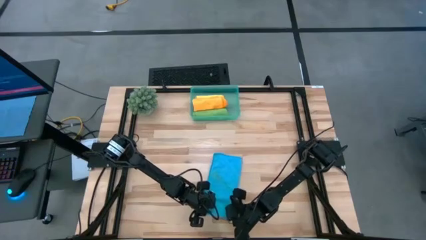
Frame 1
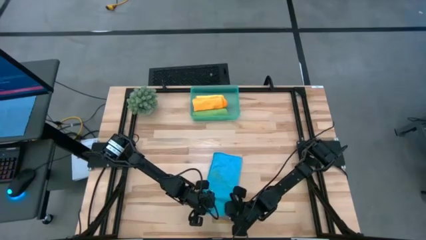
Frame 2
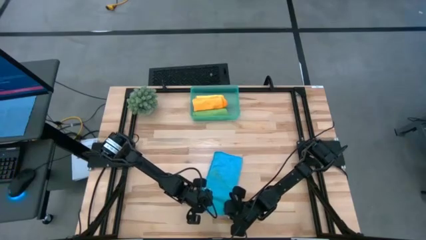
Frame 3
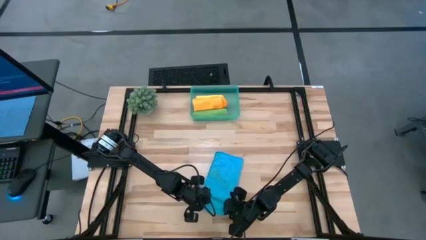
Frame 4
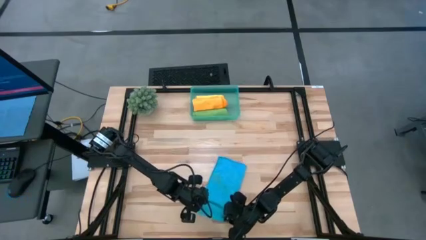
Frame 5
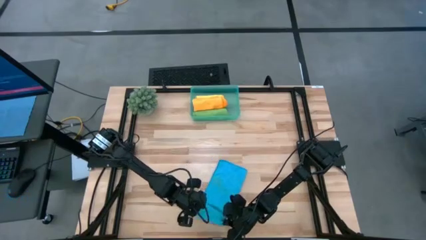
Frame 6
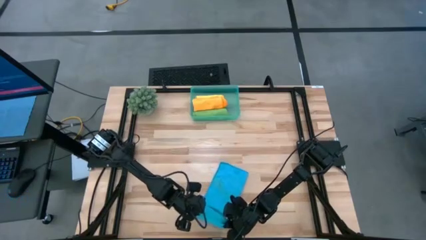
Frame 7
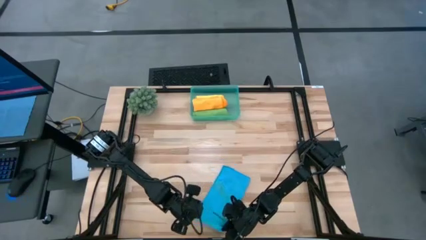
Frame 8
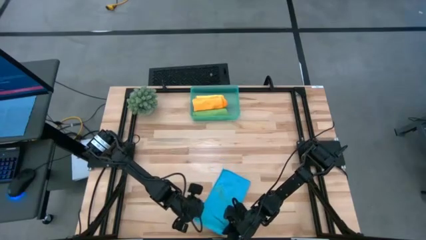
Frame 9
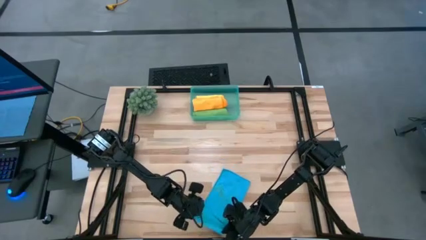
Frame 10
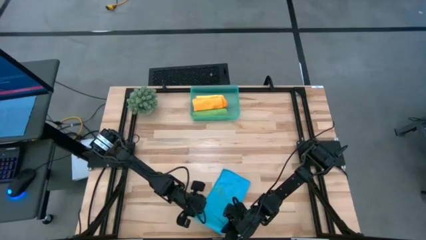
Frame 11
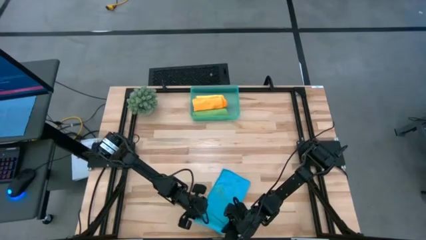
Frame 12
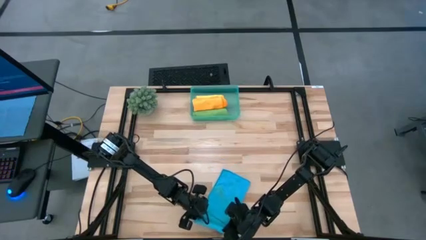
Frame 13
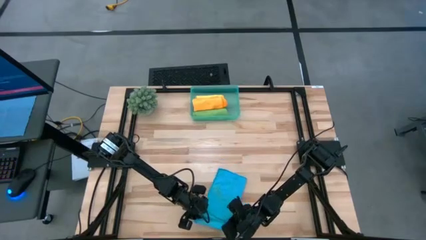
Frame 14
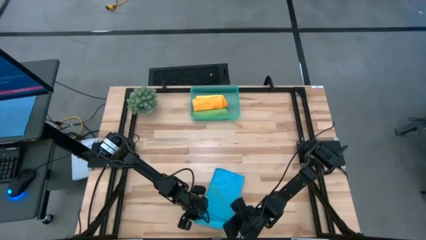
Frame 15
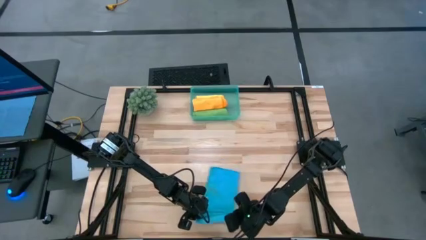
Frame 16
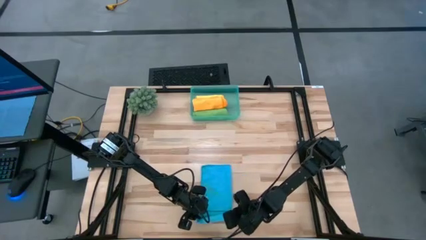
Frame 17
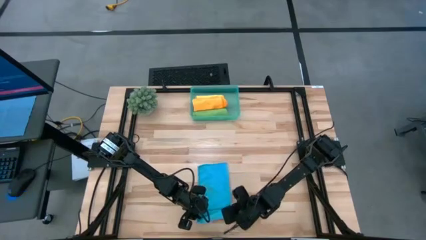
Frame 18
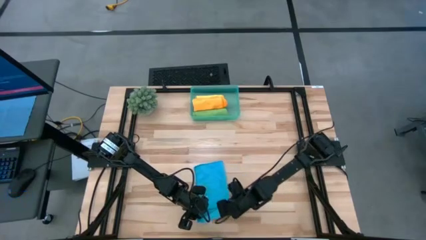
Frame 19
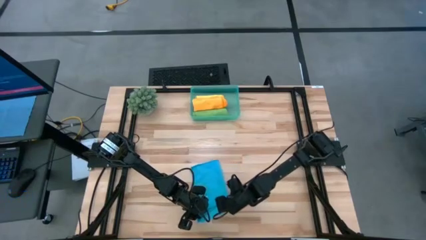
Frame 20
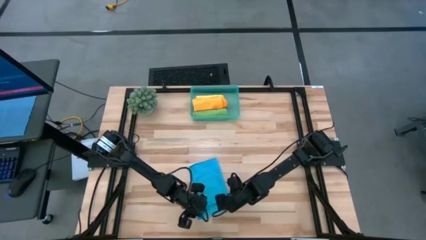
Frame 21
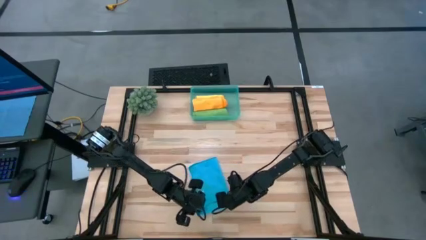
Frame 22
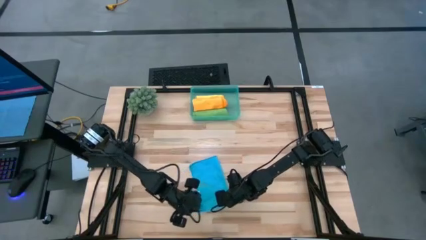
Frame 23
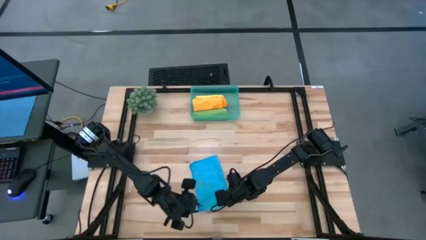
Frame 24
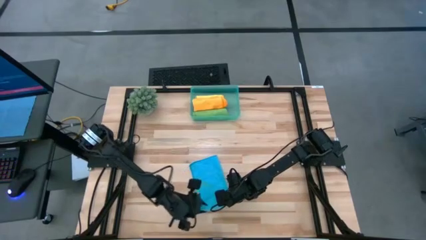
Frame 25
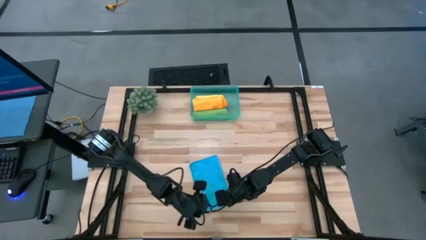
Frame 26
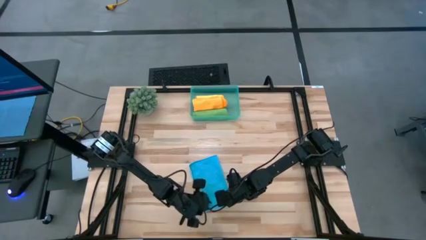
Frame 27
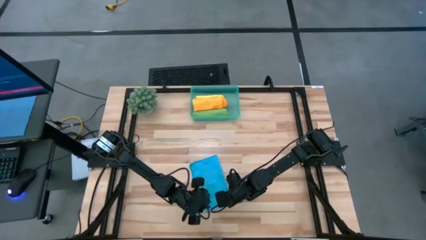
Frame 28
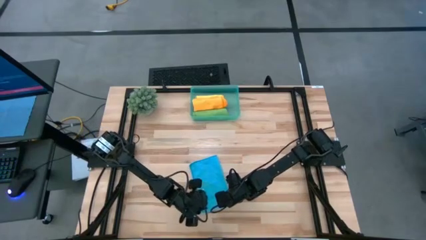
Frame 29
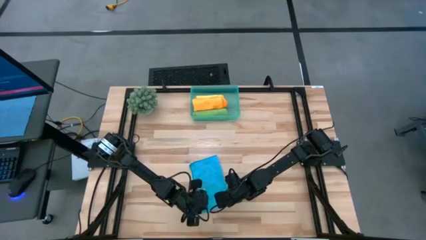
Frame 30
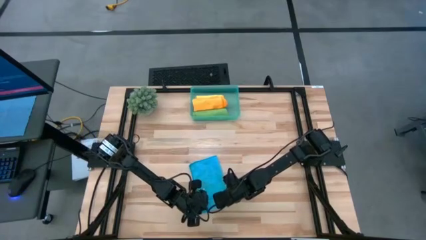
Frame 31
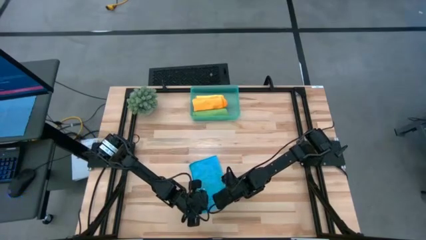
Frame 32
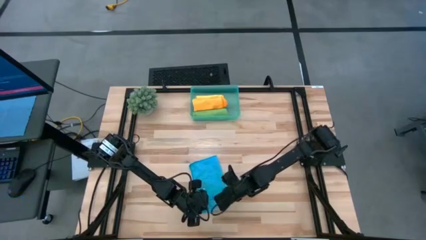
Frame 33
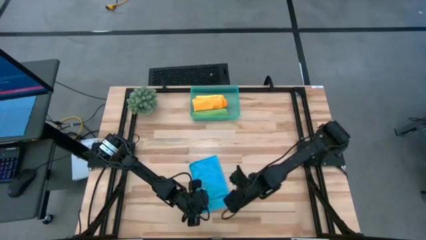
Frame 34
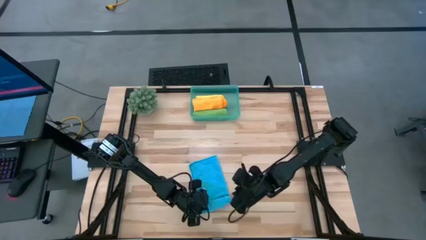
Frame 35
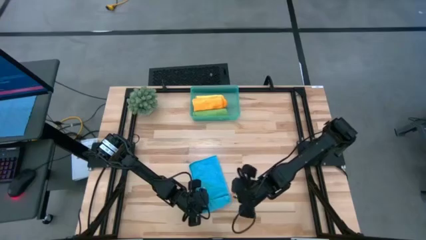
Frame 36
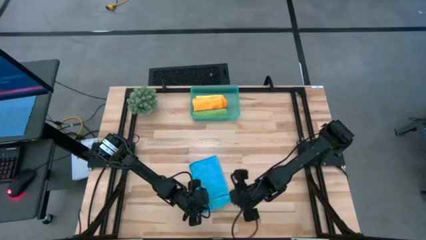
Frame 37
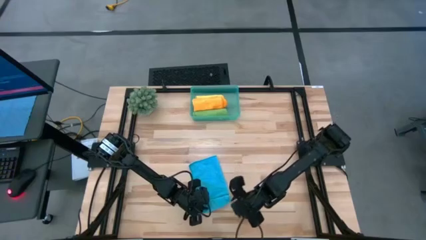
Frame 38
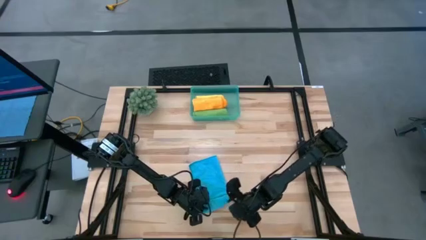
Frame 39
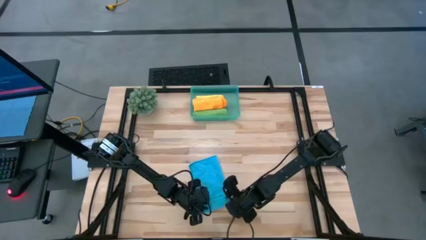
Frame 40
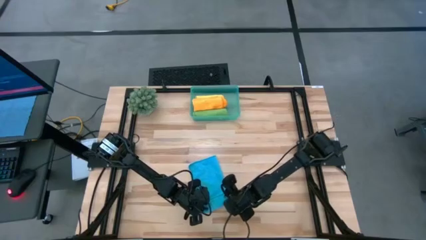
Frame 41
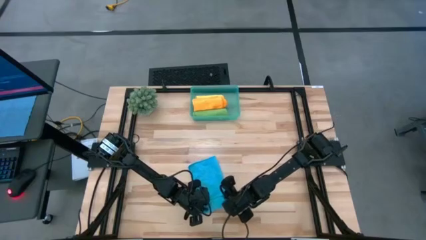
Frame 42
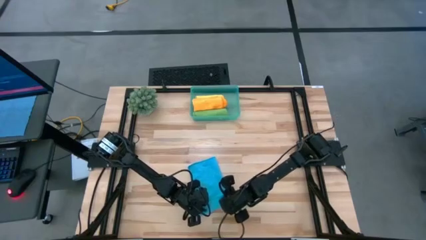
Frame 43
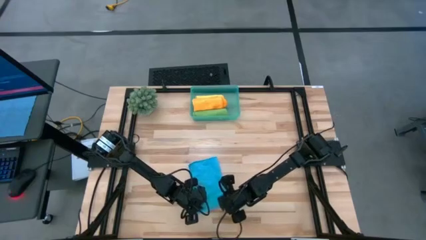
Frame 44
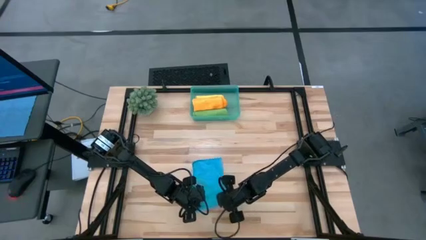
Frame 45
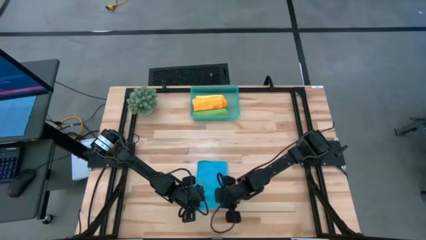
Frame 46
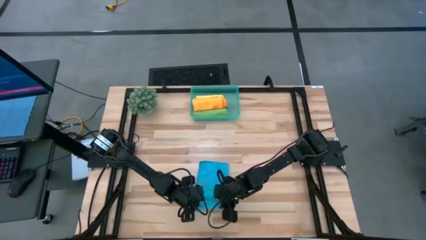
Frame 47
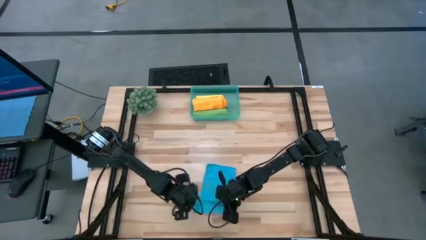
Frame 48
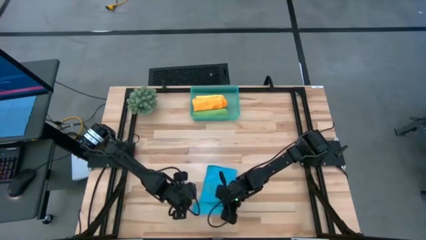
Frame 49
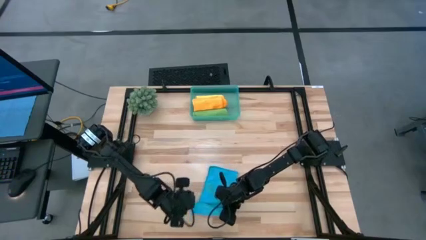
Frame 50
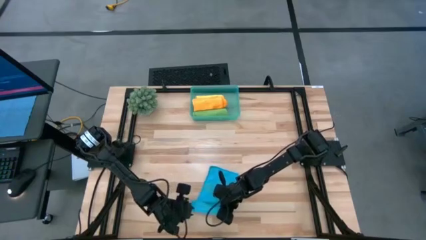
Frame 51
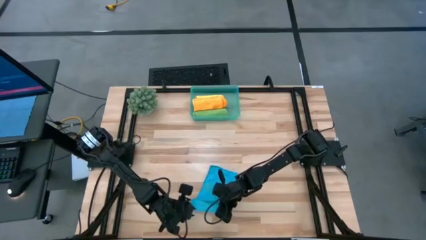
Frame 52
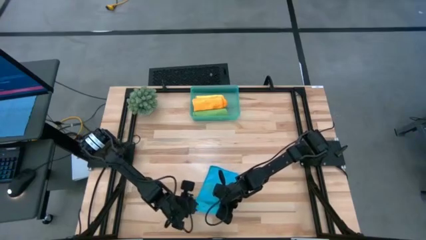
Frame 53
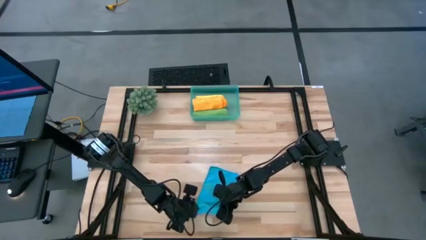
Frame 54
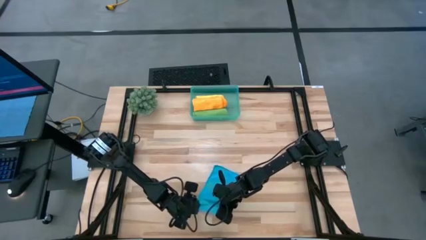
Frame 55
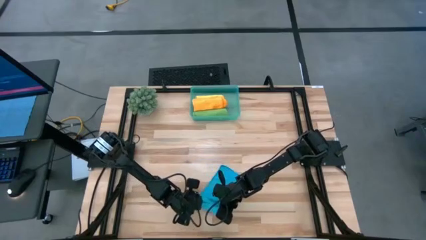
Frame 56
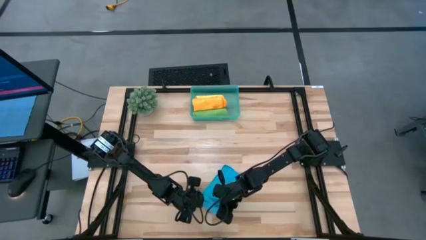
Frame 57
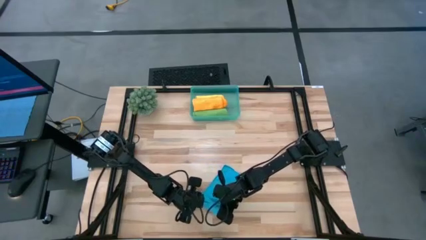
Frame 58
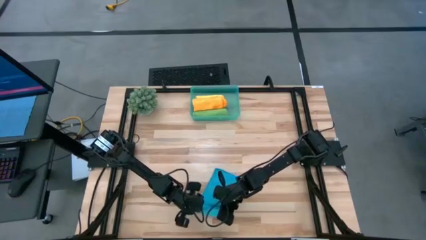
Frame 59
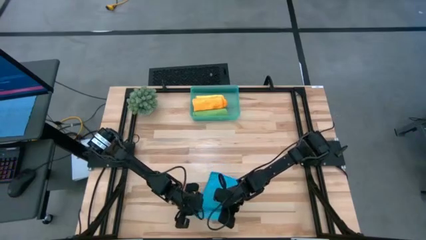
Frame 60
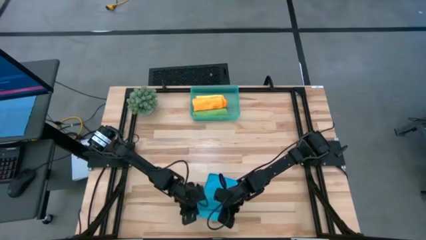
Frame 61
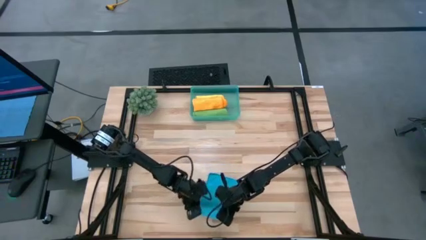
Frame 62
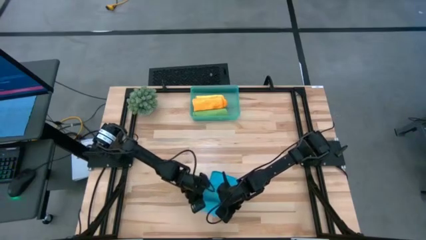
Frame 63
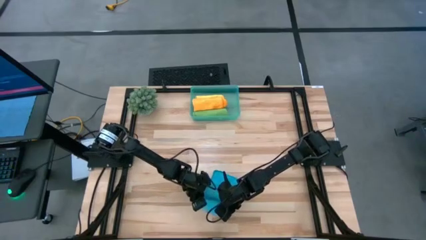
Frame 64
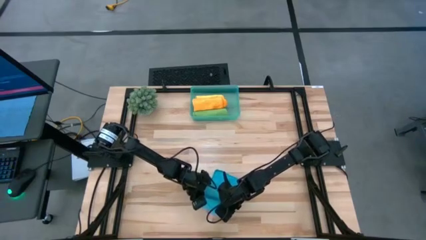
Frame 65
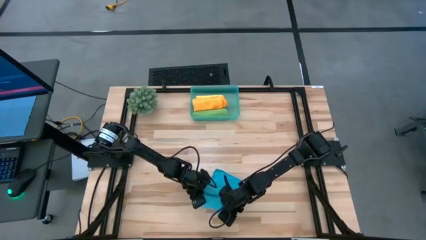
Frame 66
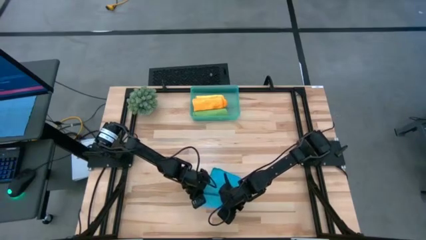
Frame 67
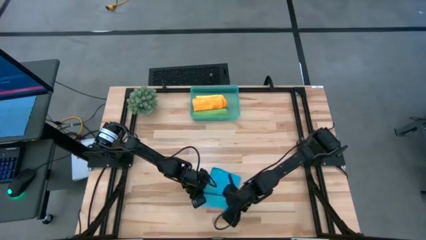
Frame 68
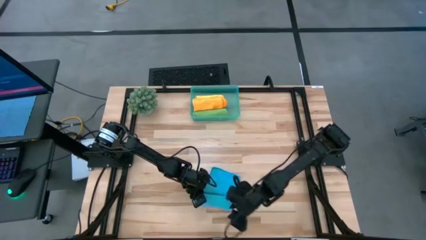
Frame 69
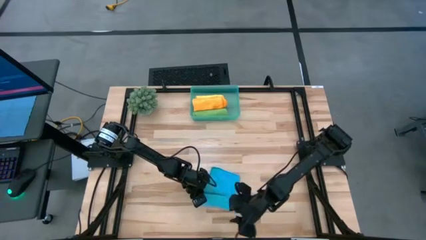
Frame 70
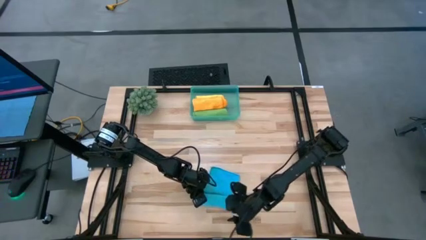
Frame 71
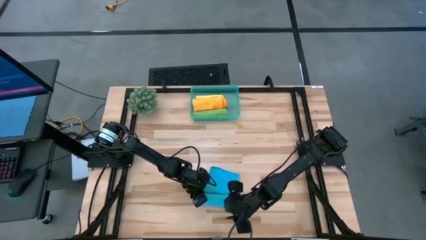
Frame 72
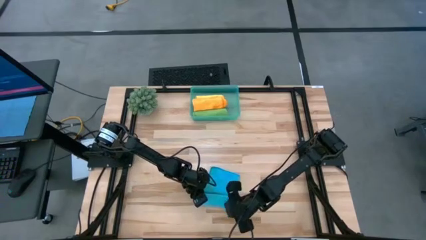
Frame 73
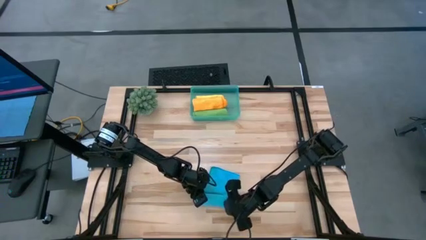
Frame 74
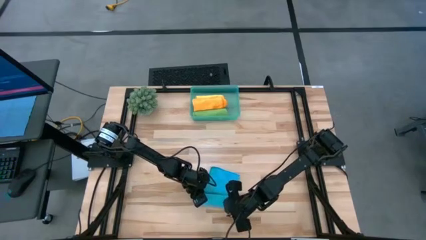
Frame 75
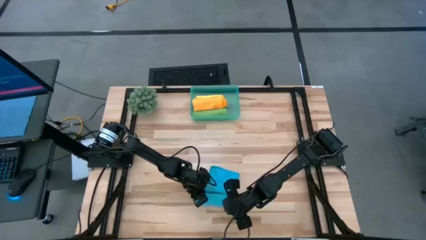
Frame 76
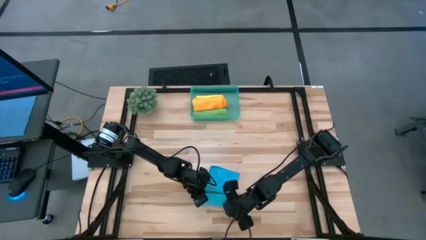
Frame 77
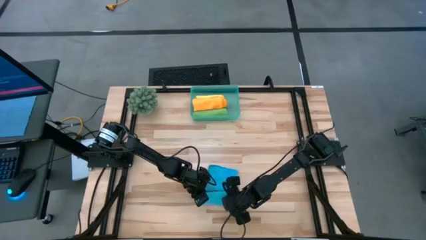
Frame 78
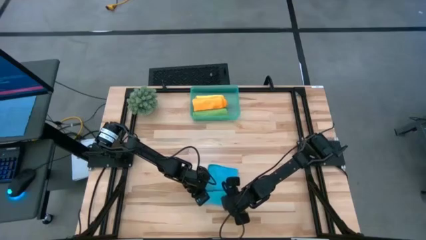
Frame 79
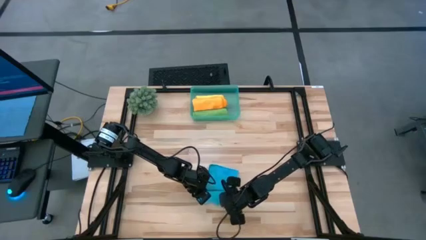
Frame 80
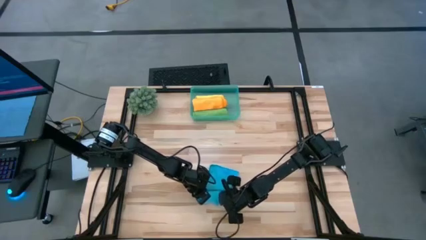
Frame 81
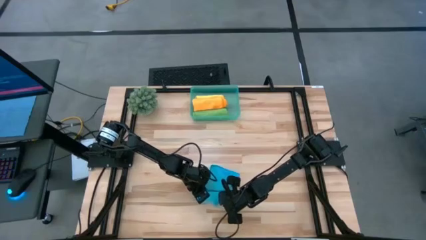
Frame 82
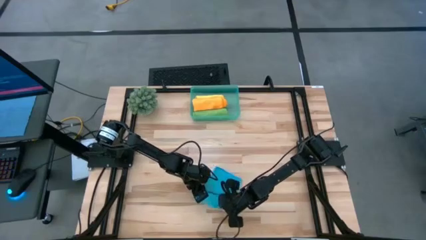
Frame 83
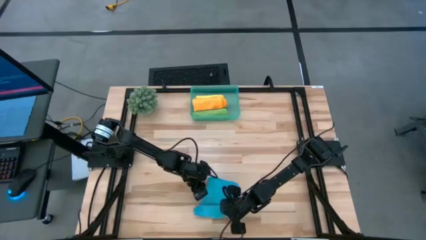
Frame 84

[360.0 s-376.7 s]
Task: Roll microfiber towels into tight, uniform cylinder then place into a basket
Roll the blue towel
